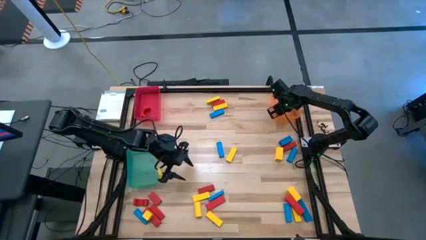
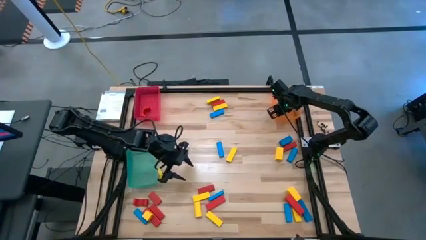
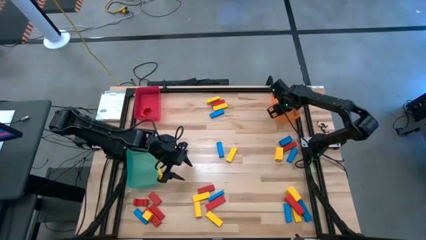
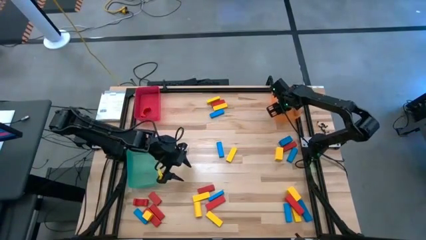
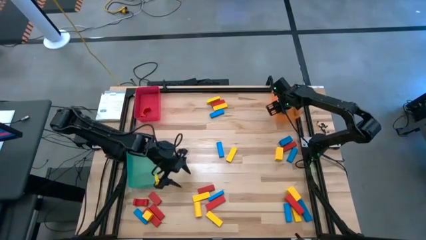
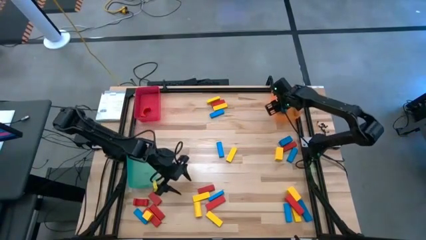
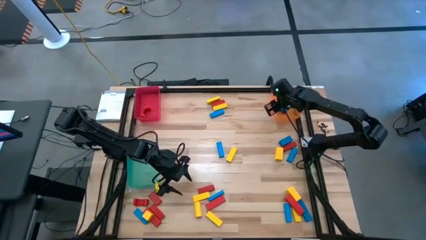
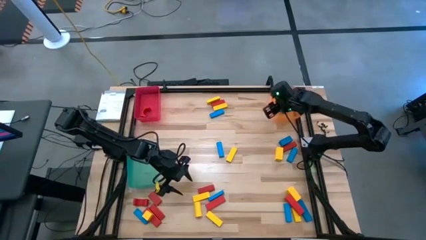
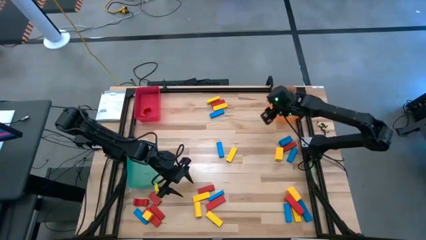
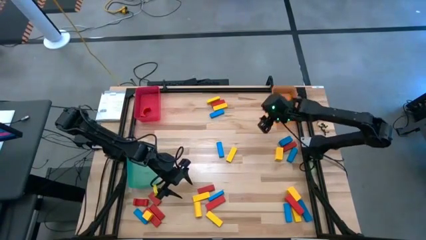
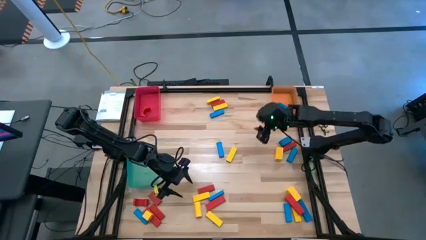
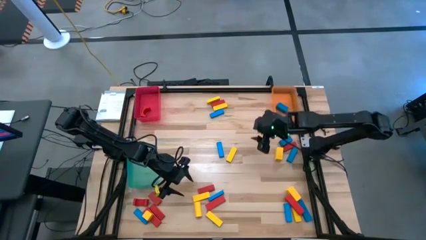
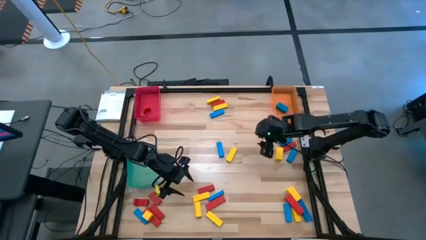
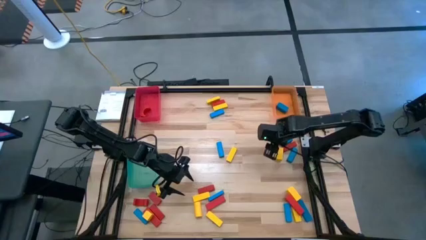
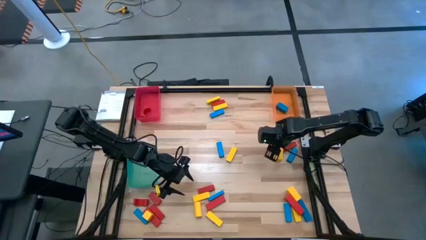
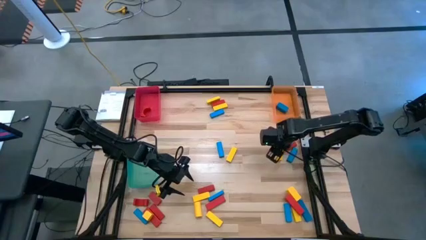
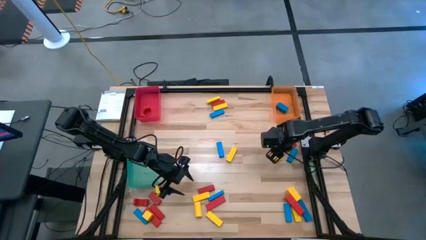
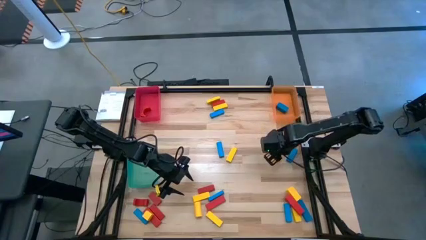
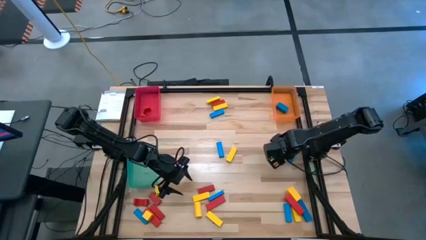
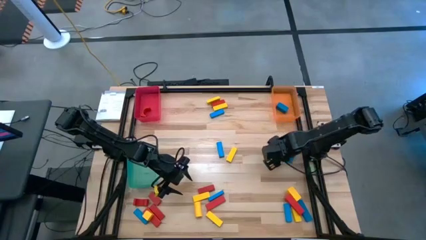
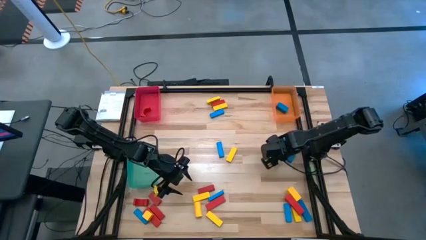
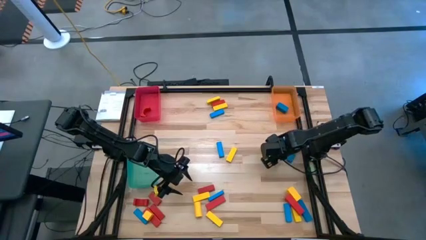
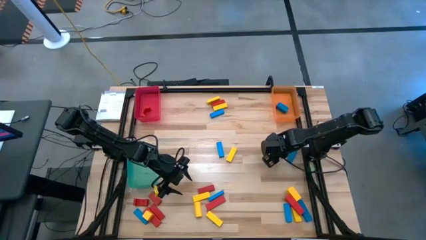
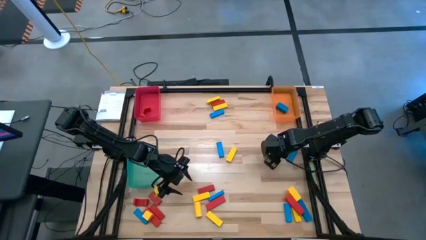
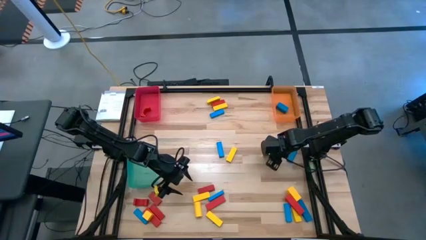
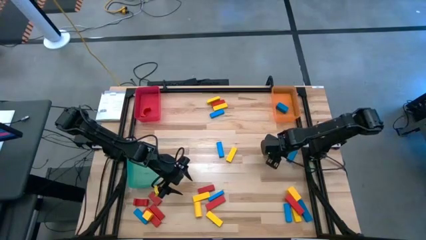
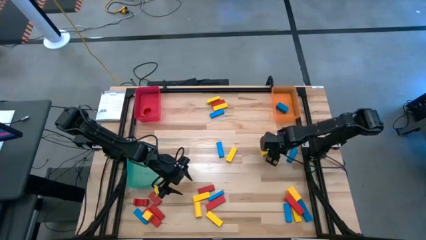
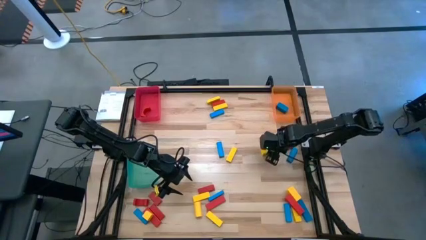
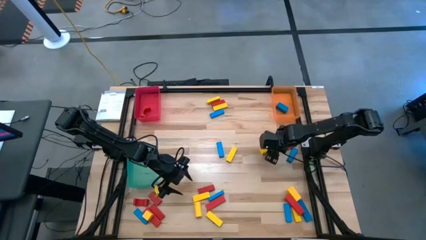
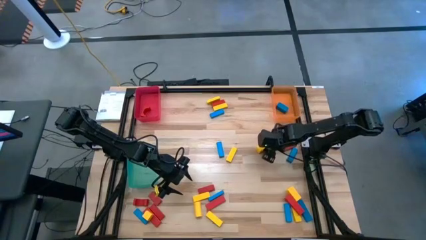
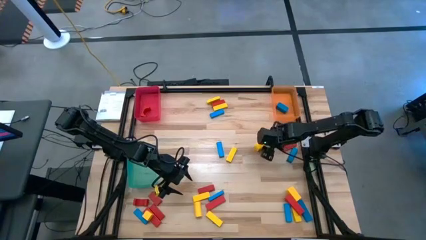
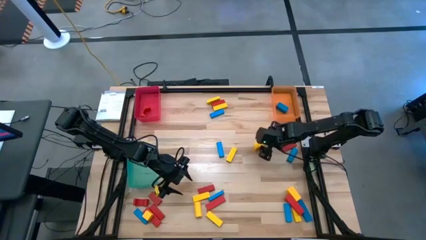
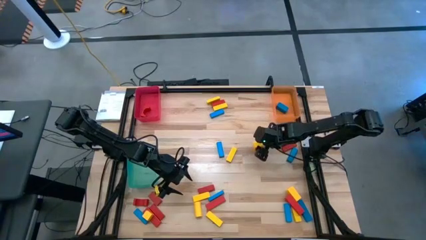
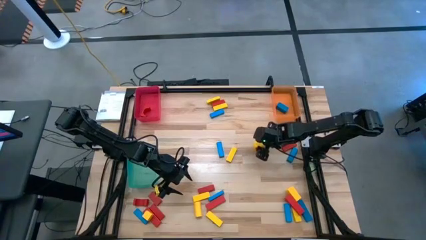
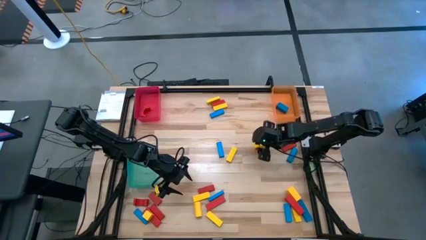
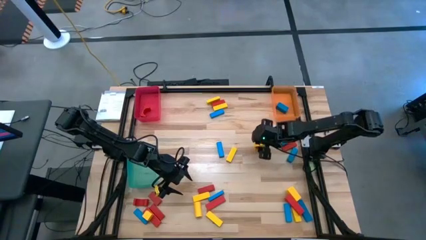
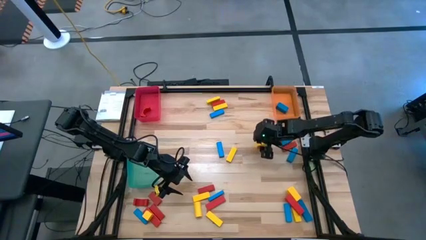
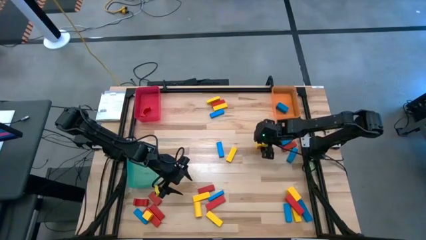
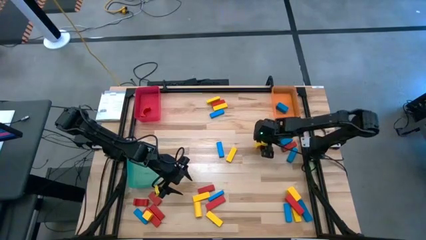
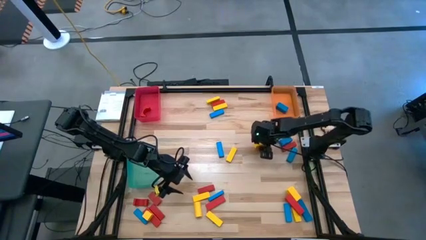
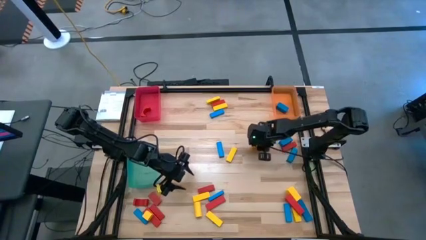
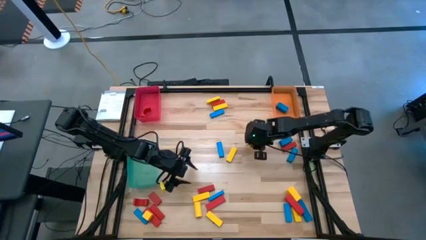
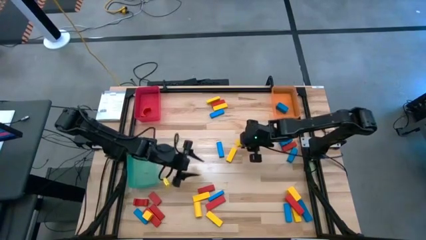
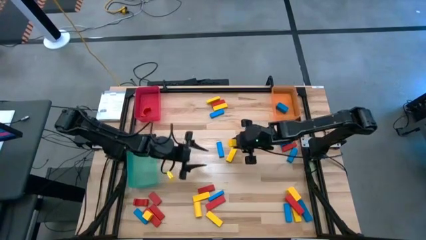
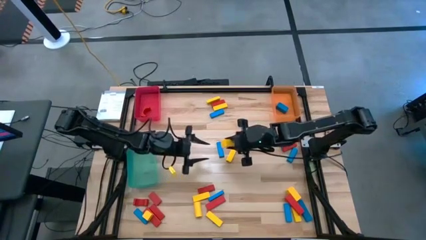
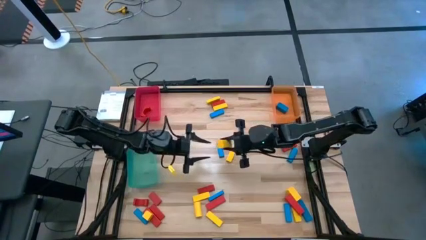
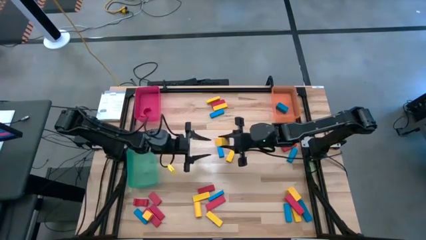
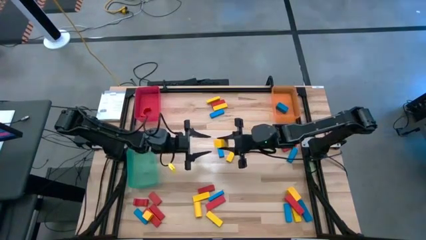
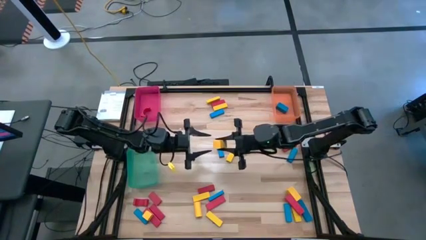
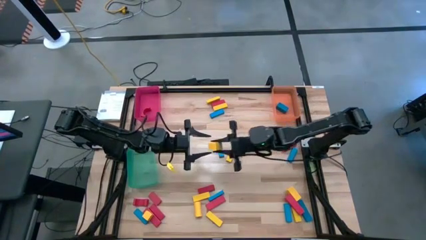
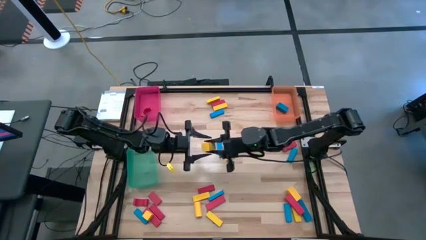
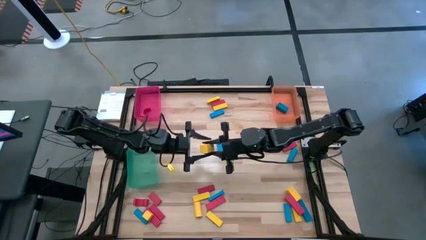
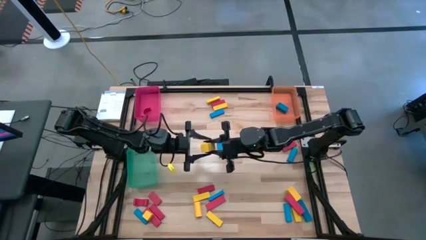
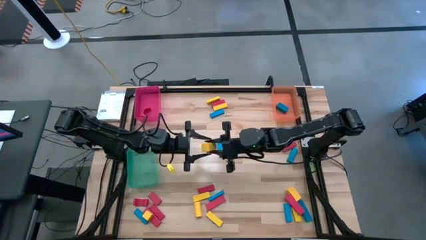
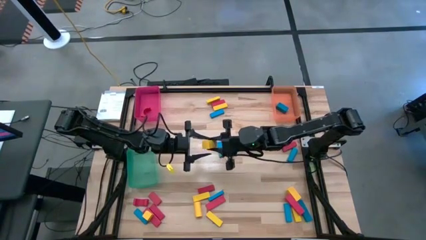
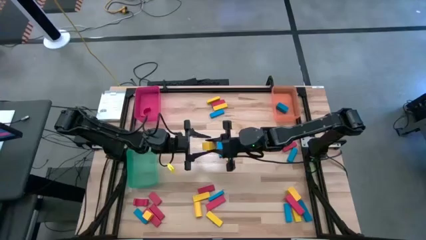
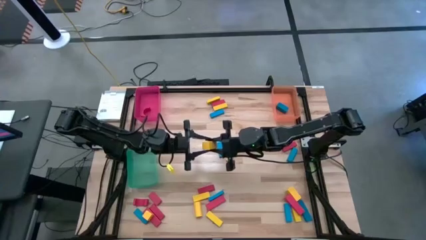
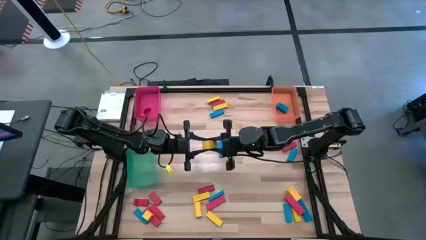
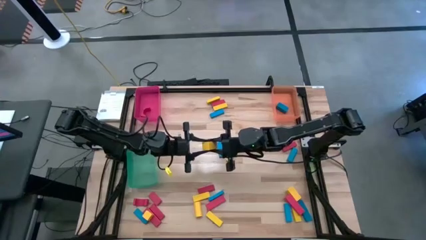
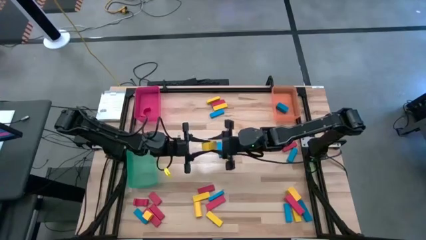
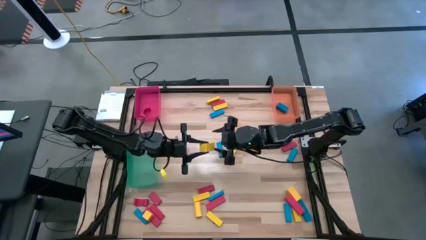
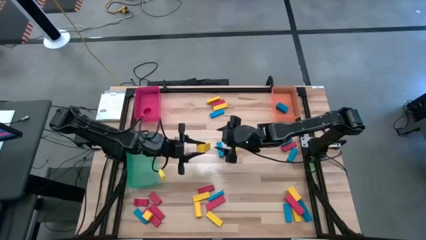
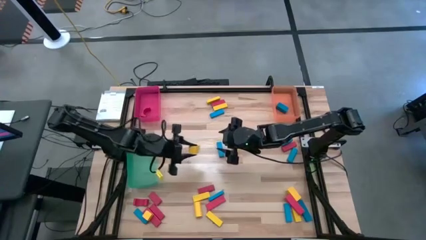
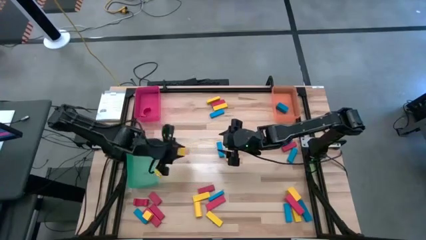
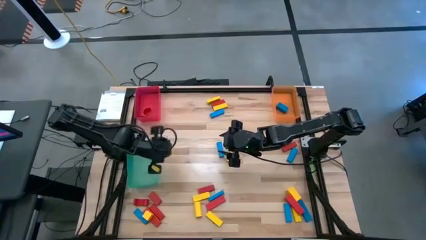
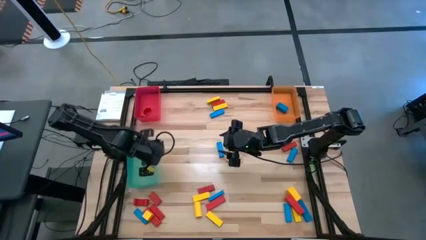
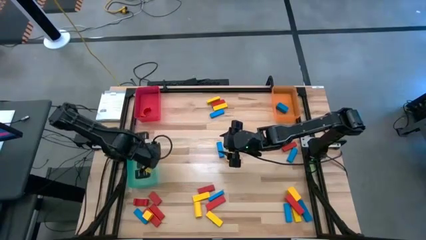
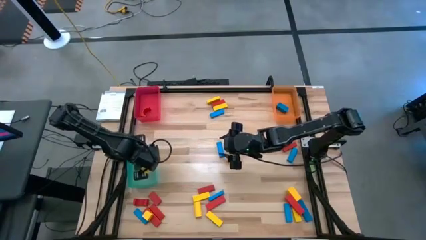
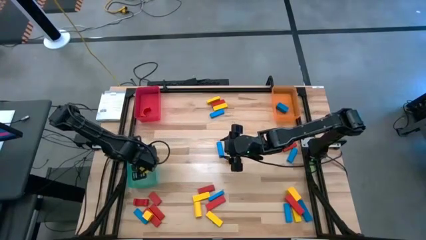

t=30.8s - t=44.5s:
Task: Sort blocks
Put the yellow block into the green bin
